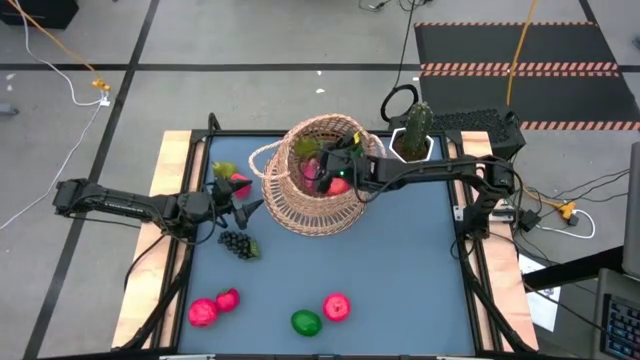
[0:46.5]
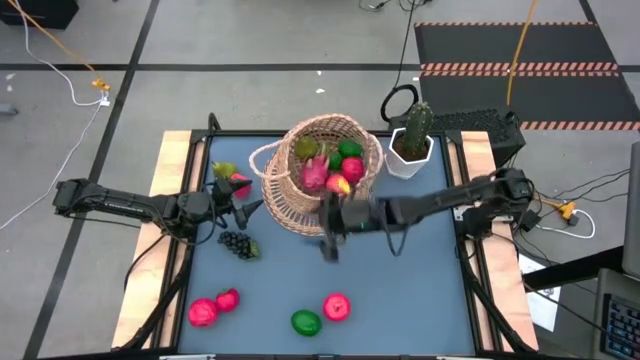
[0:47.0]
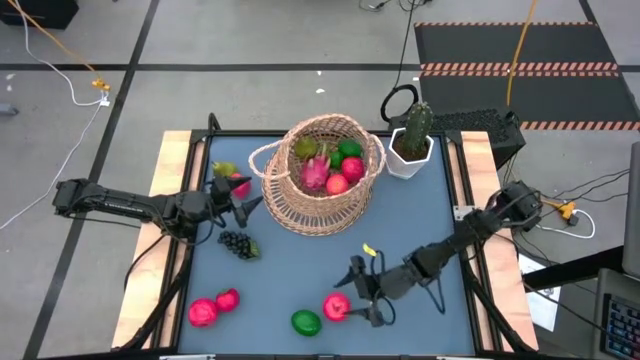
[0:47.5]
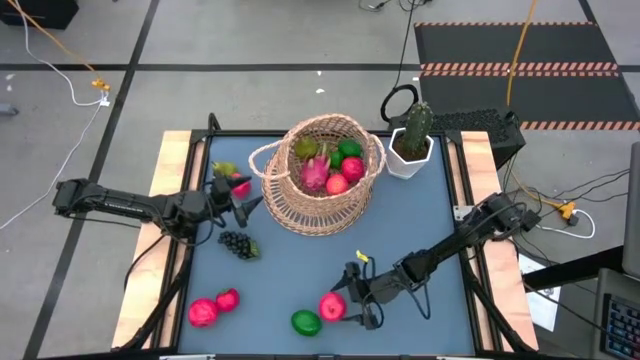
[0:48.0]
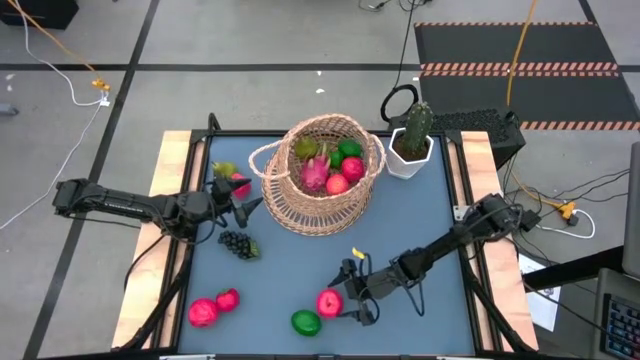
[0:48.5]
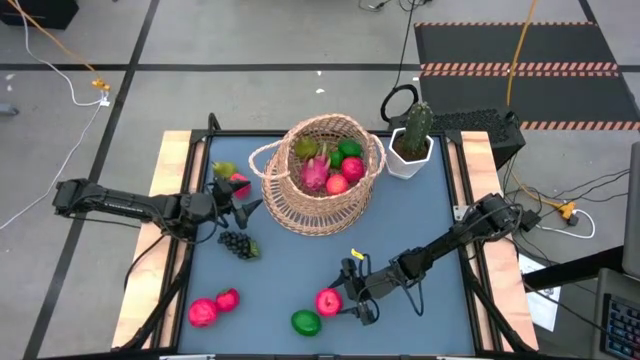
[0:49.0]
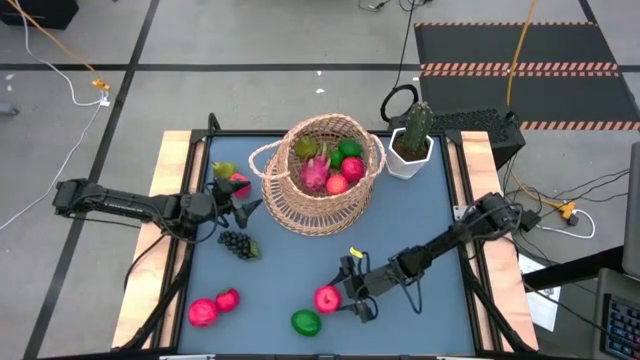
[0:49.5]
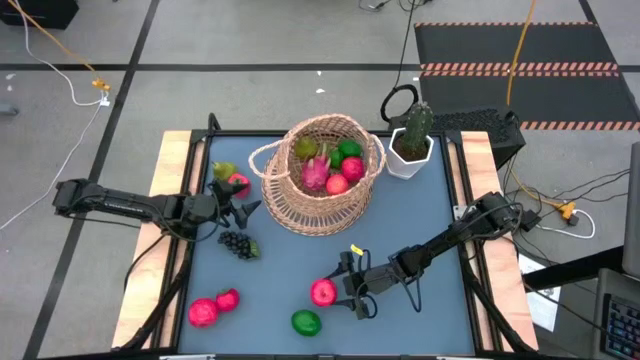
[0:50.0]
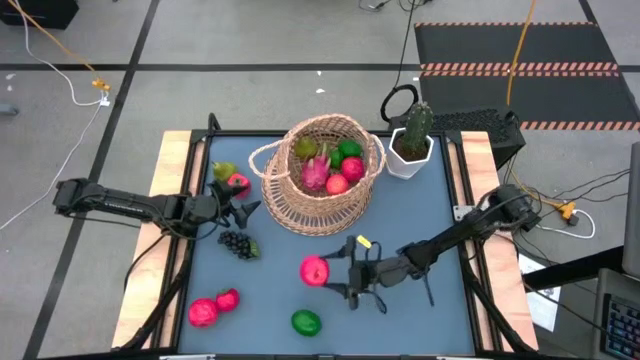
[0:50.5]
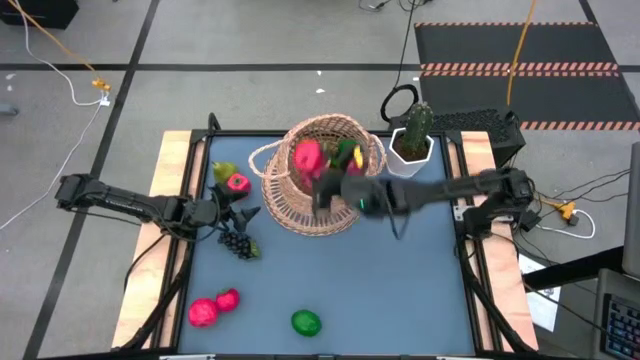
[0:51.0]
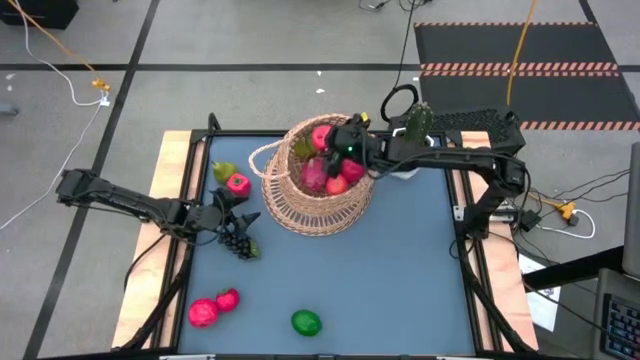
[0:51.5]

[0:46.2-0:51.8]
Task: Build produce basket
Put the right apple into the basket

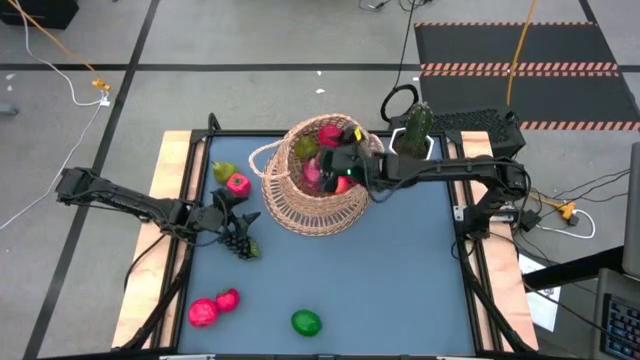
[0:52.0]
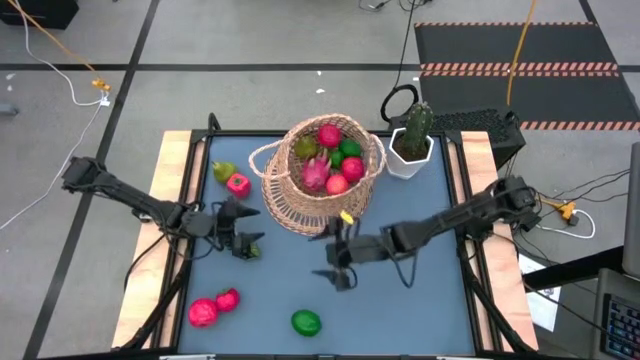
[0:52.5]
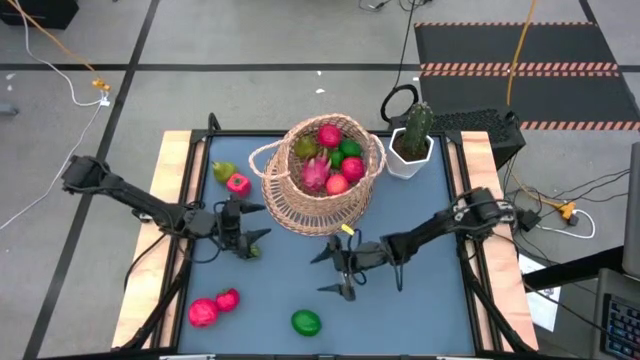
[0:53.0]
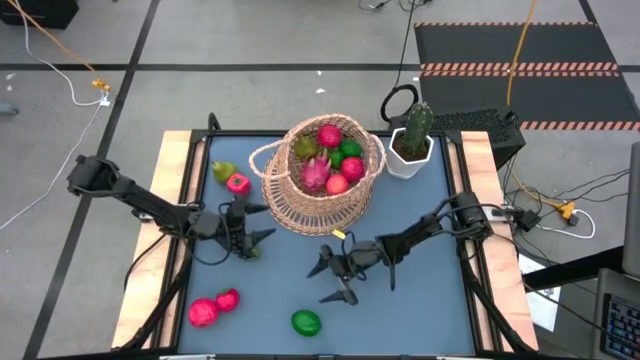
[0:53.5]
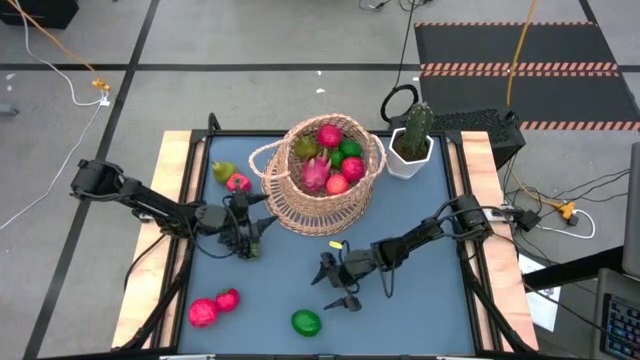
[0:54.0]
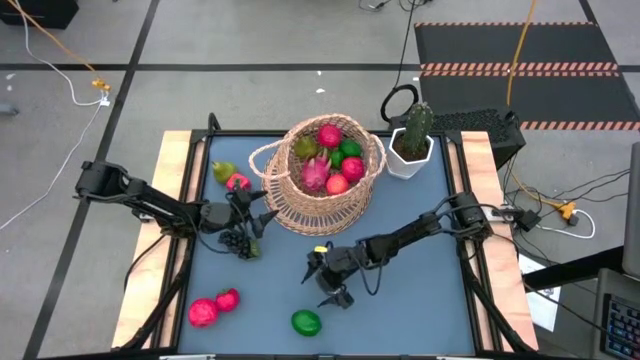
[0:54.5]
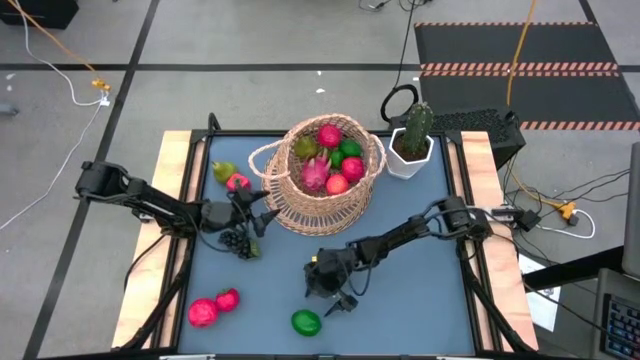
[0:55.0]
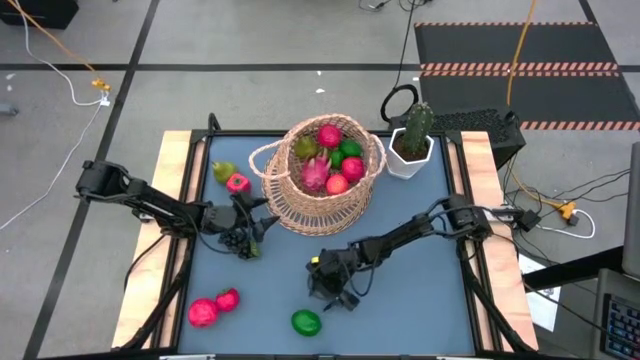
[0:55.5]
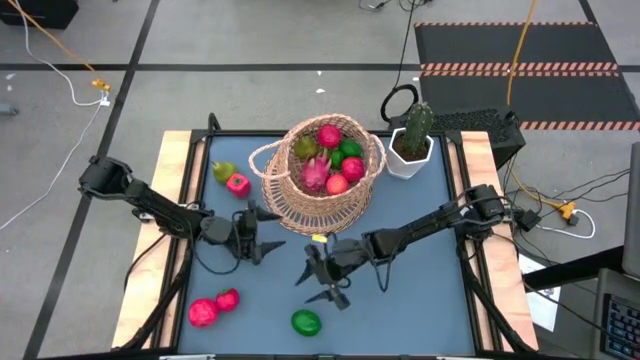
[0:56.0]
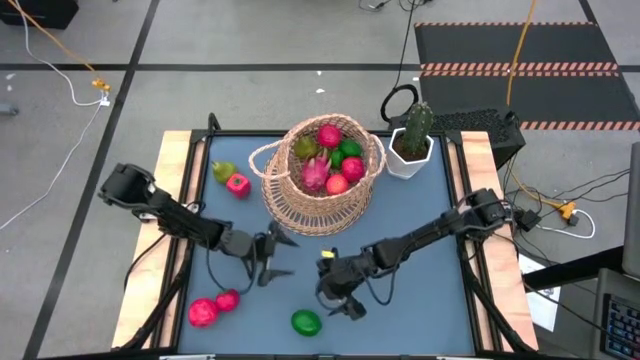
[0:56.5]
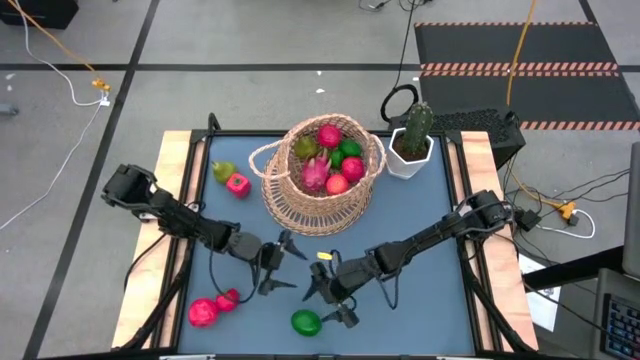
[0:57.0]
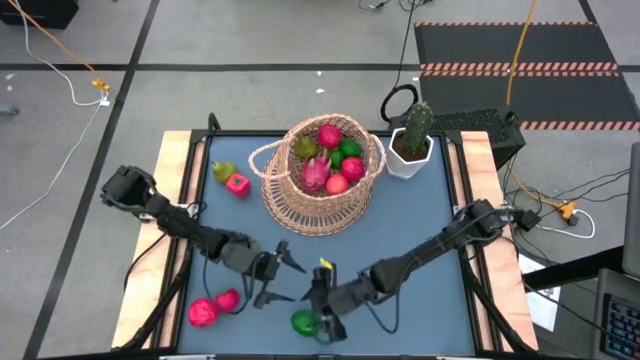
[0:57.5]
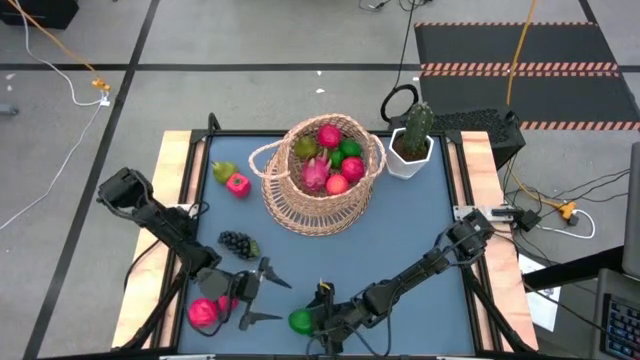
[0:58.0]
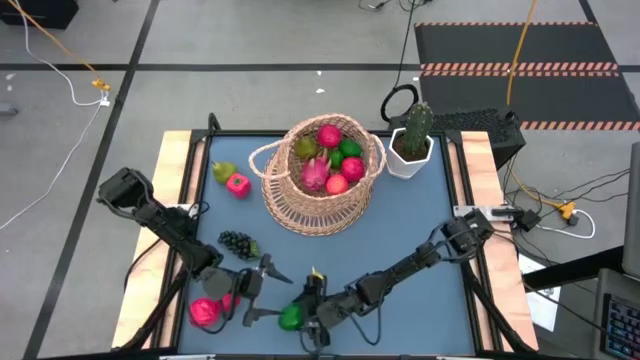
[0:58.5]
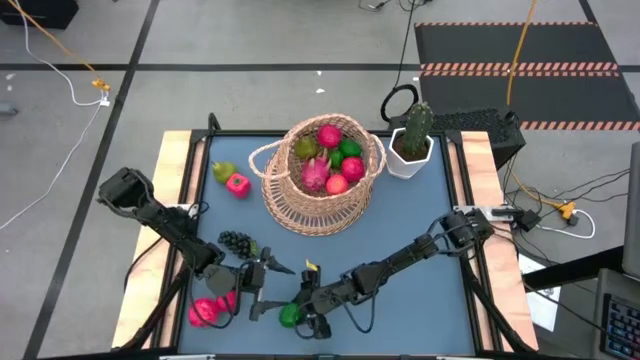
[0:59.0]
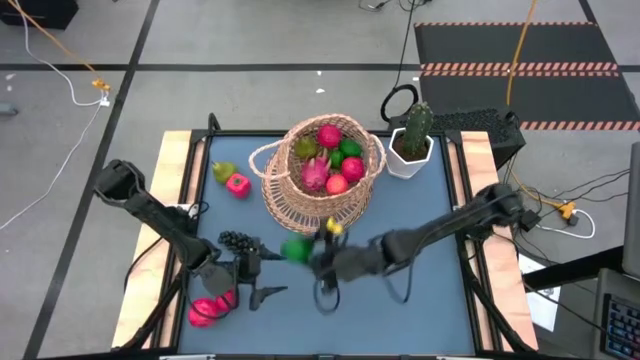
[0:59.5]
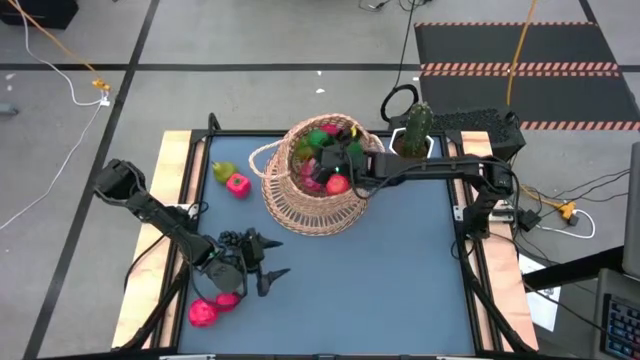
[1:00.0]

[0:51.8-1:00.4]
Put the lime into the basket

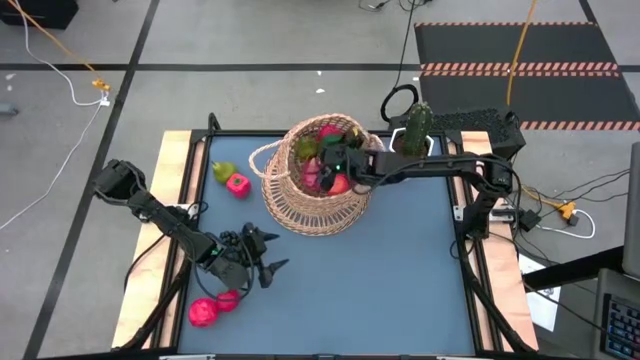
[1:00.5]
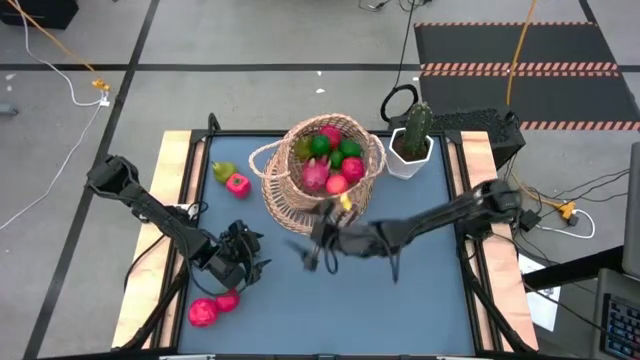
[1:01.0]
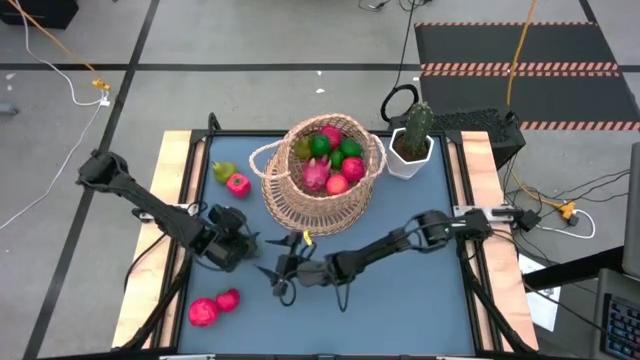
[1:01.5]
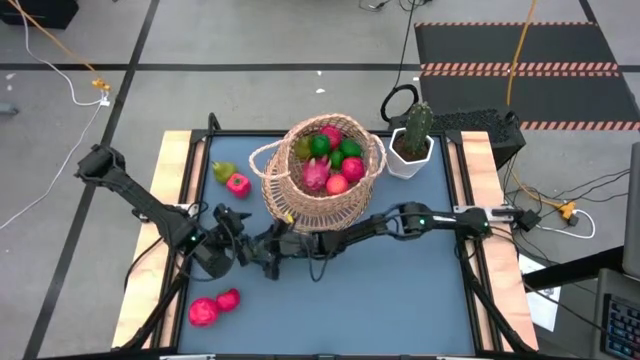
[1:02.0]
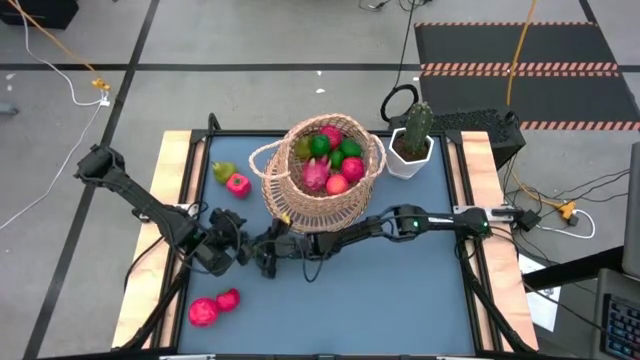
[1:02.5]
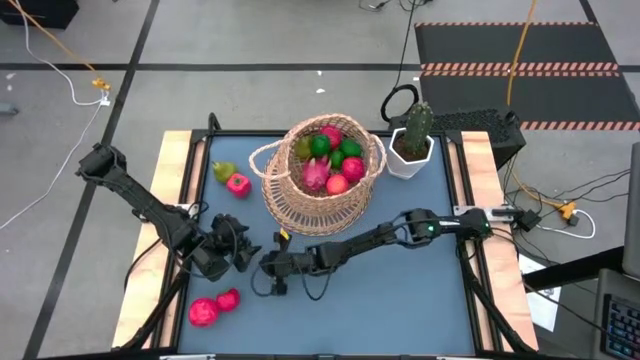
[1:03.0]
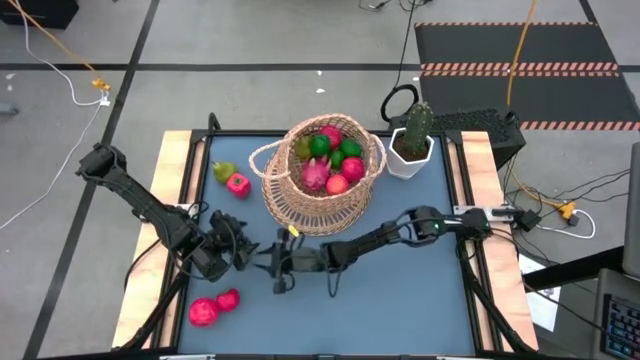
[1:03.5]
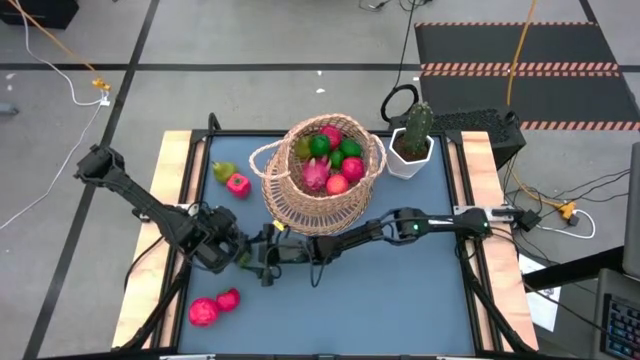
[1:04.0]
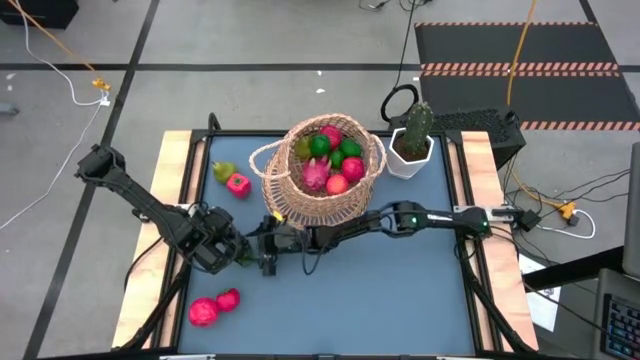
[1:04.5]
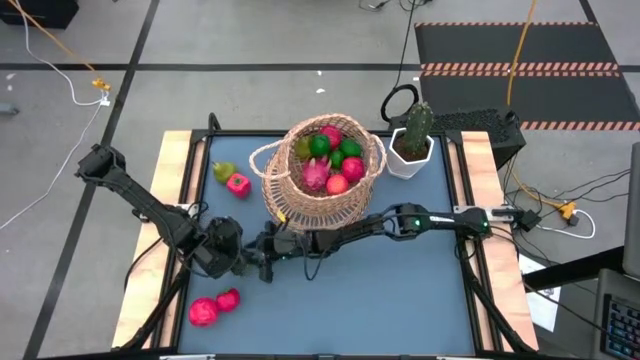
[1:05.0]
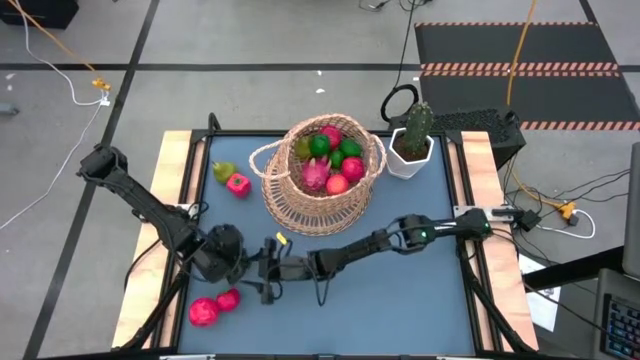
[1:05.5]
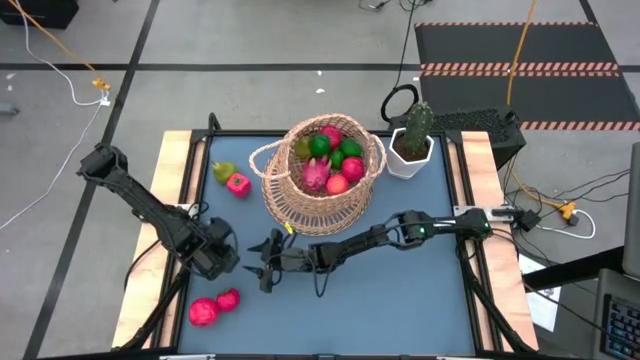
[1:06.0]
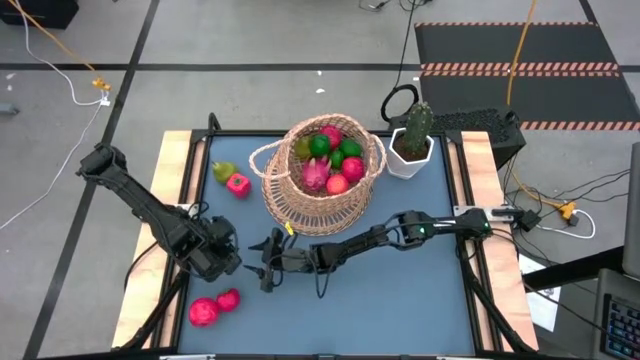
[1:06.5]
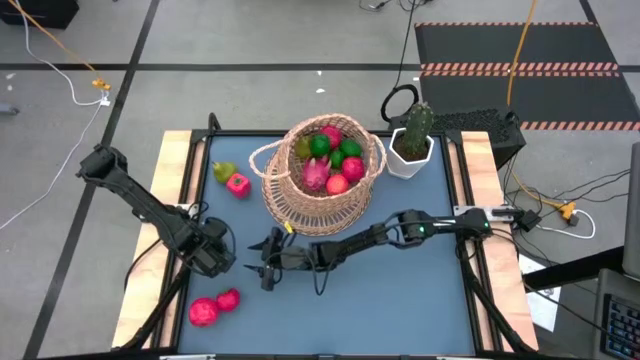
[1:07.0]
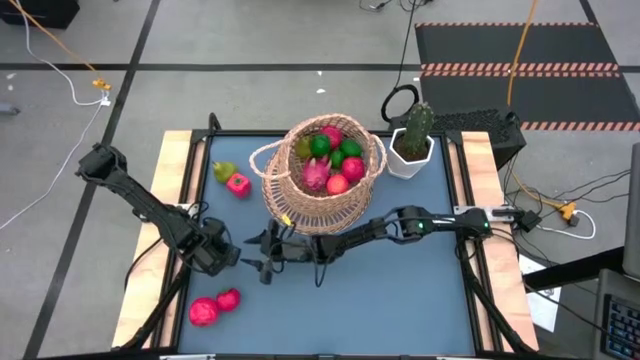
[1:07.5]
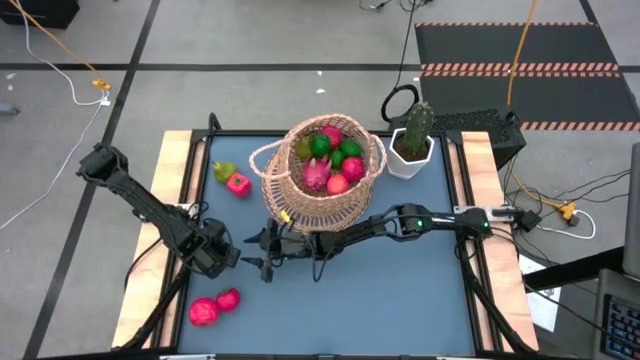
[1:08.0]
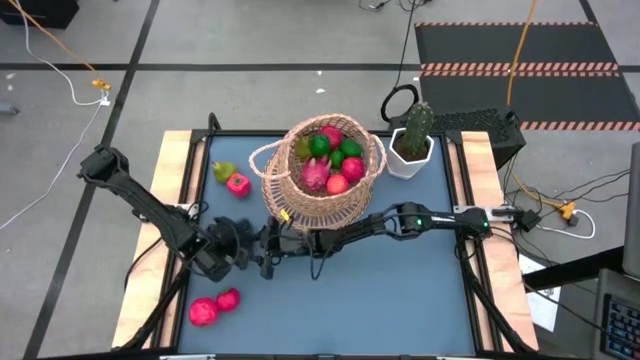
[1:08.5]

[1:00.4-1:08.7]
Put the grapes into the basket
